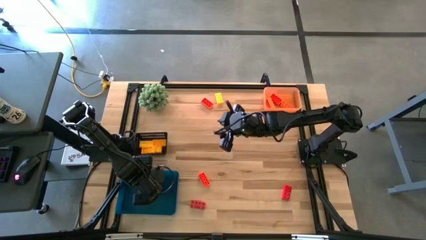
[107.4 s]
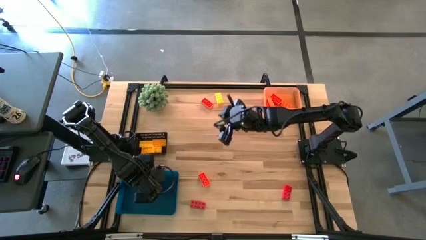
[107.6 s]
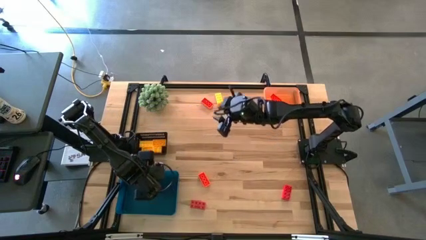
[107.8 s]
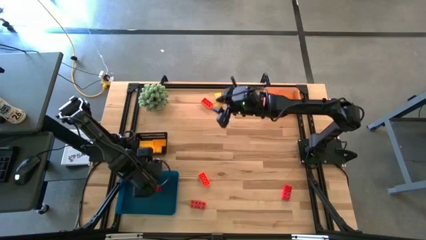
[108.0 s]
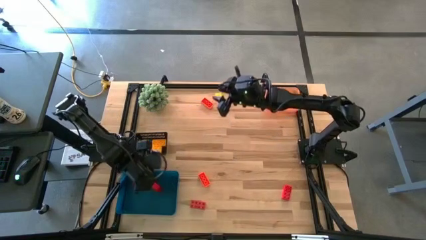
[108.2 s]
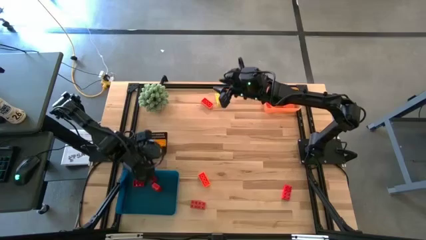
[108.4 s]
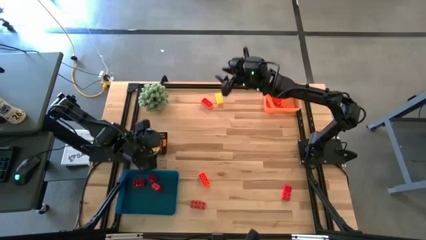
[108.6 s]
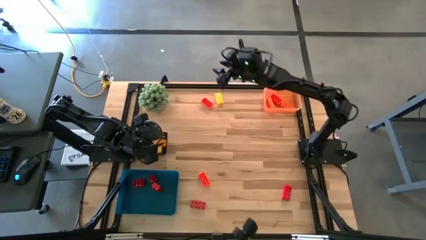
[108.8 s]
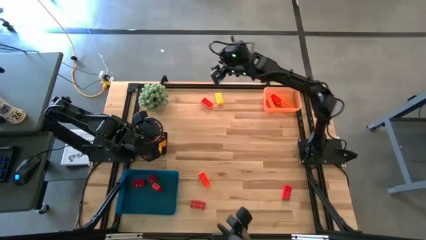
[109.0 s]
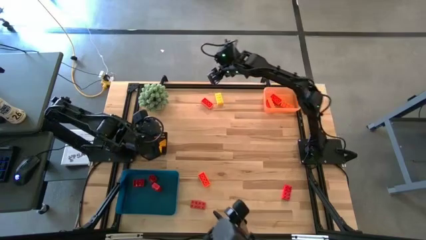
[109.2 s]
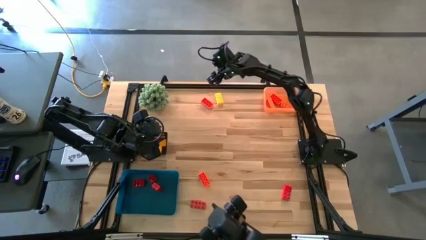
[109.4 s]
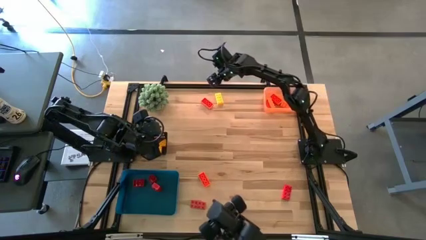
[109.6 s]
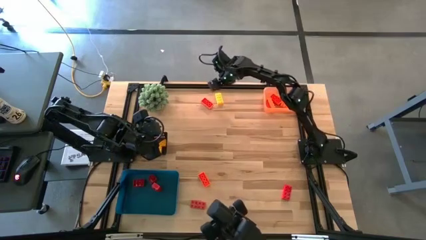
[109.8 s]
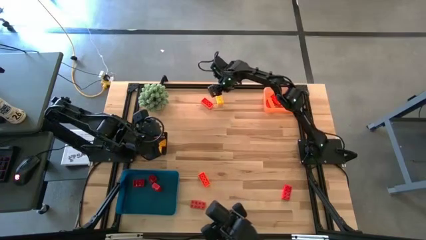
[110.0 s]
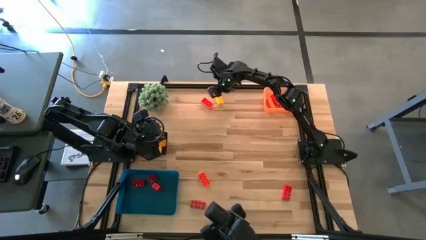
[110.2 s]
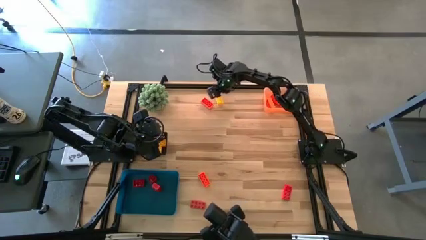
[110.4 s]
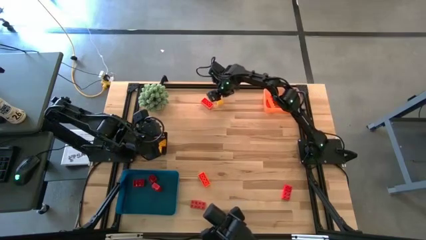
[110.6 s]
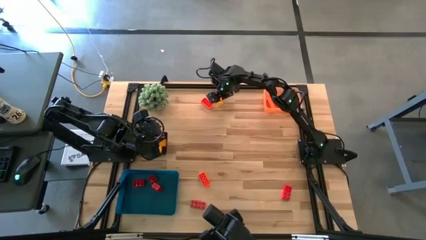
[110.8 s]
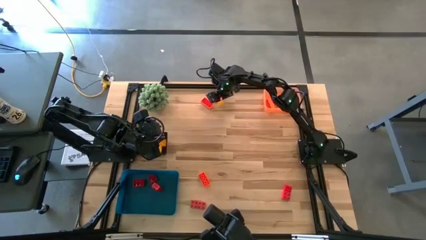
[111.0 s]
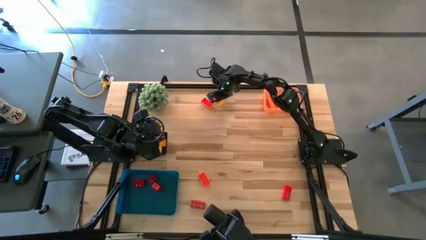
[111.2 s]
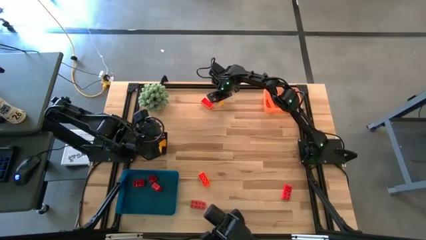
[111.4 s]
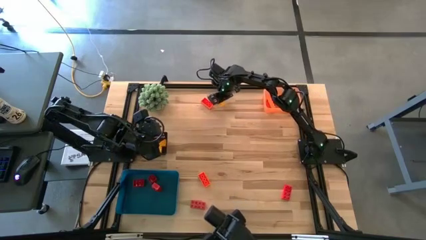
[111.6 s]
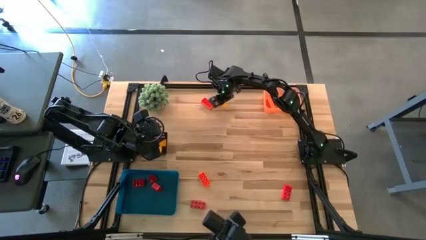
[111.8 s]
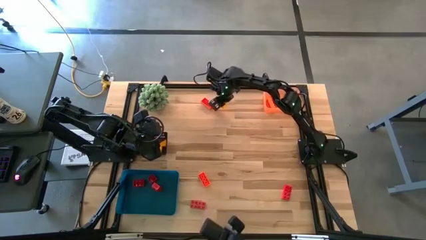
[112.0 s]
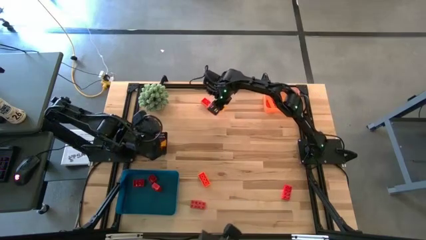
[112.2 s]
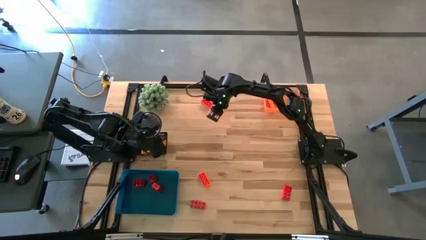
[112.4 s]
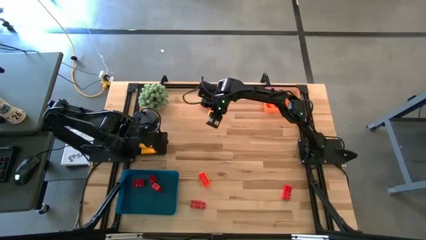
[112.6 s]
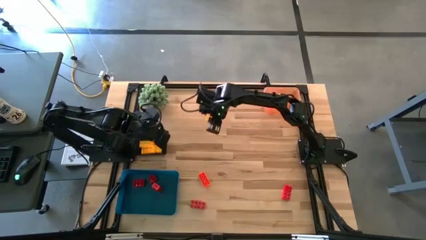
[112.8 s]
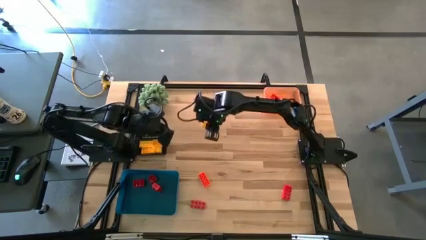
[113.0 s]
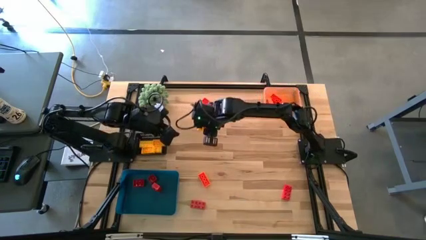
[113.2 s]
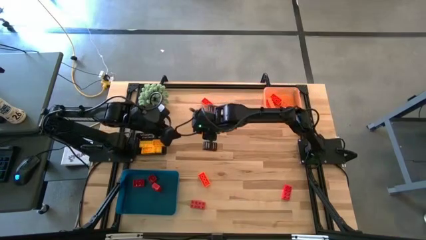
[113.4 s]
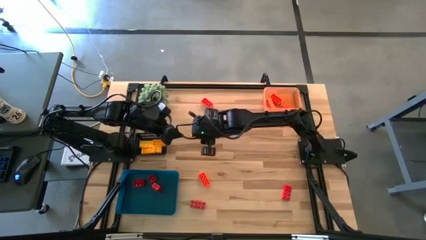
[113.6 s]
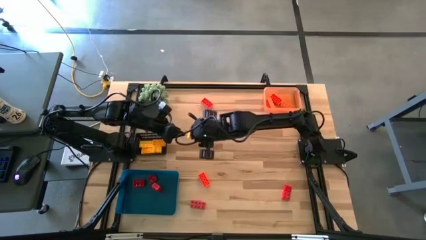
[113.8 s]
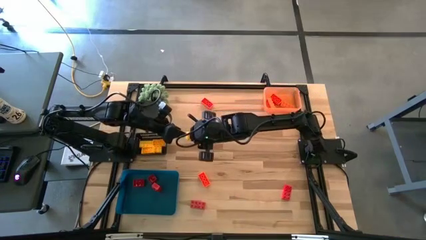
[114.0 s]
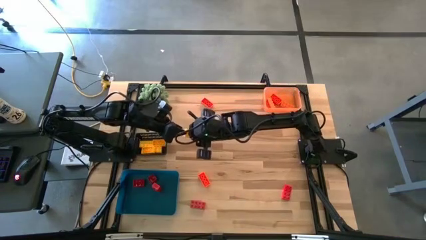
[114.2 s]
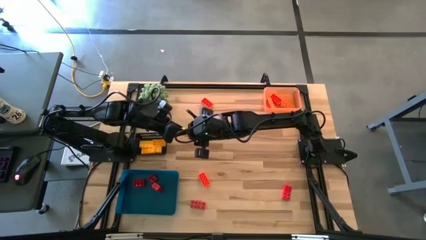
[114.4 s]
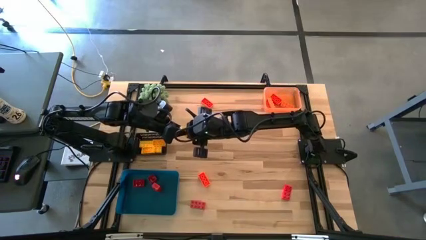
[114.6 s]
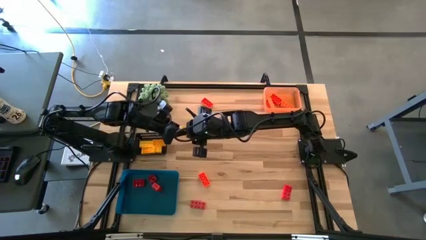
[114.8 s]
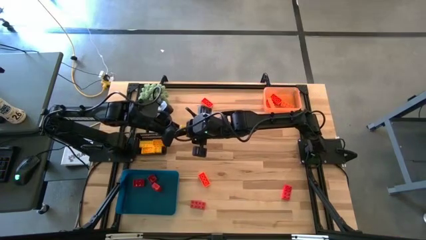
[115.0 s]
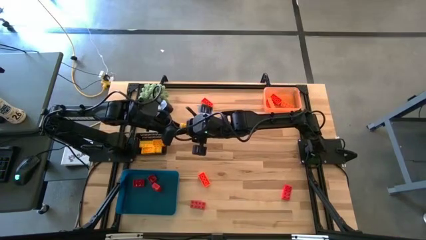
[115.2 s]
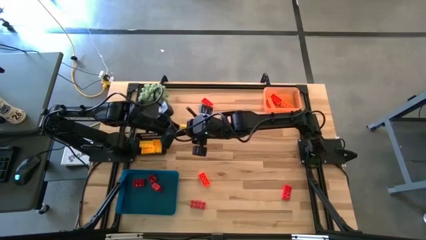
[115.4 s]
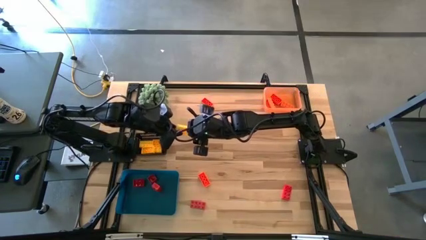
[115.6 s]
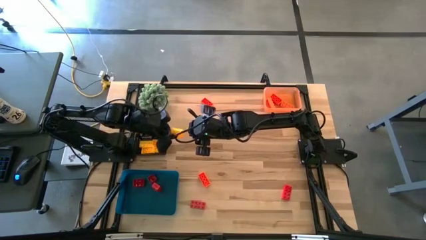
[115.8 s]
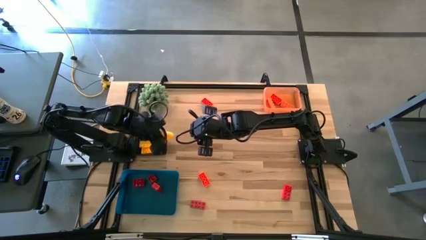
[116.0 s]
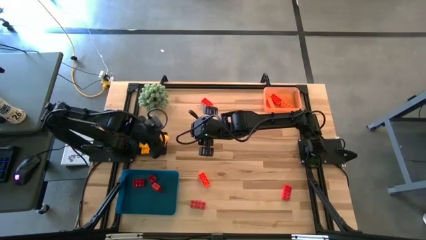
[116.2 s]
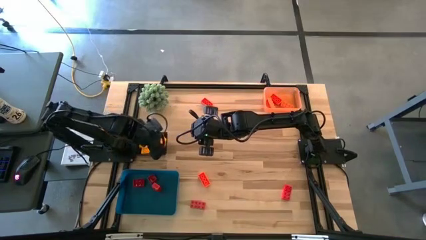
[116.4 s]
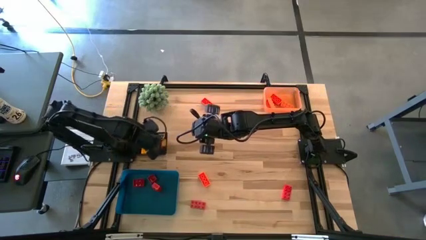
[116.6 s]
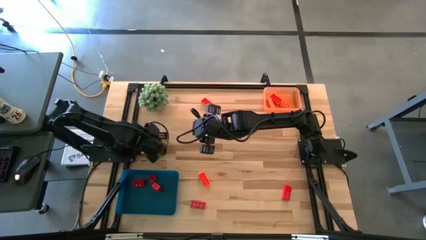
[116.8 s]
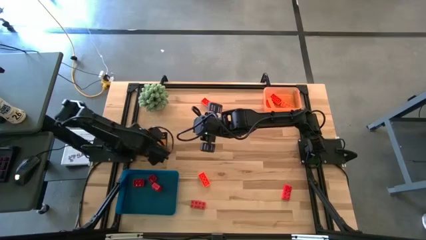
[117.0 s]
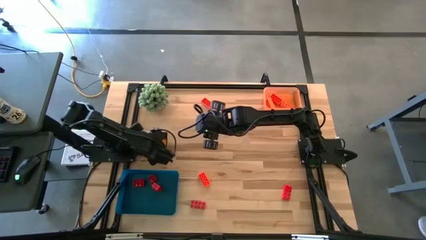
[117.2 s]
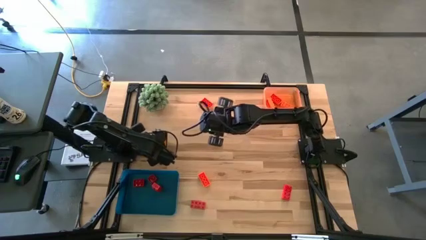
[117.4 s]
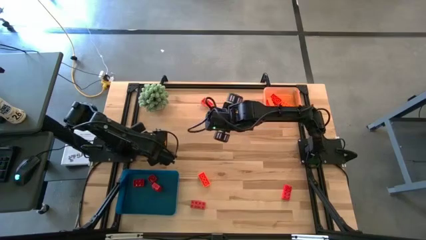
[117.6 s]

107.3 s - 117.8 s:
Task: Sort & place blocks by color
Put the yellow game piece into the black bin

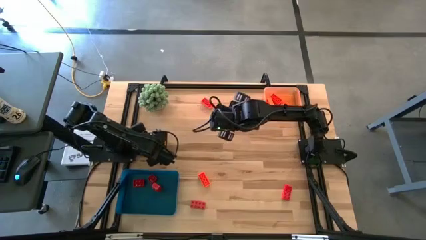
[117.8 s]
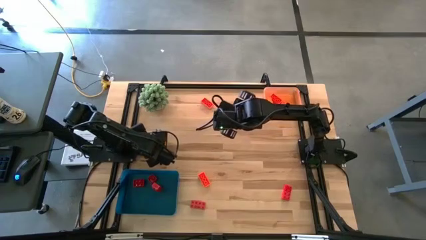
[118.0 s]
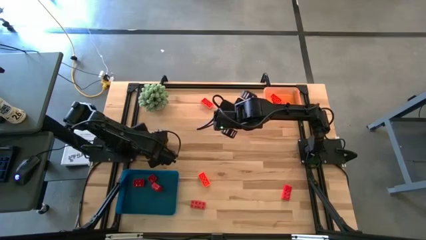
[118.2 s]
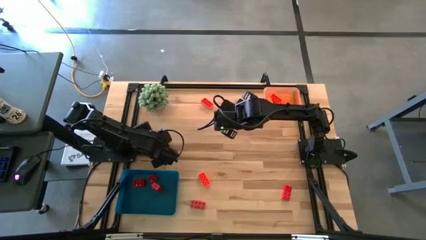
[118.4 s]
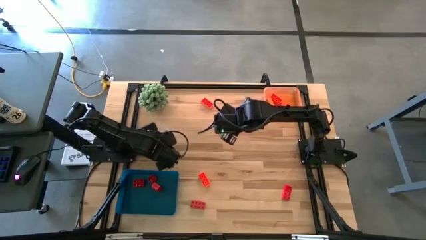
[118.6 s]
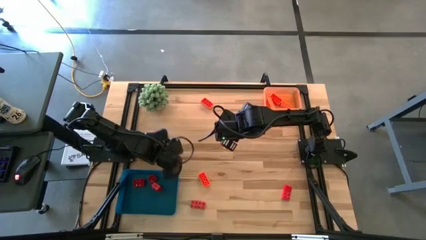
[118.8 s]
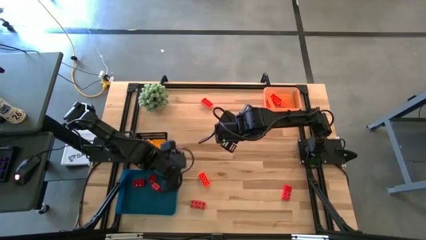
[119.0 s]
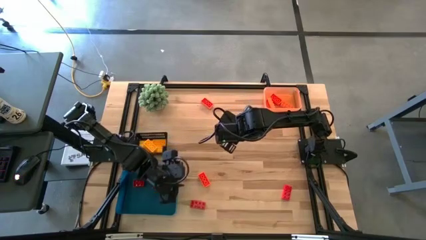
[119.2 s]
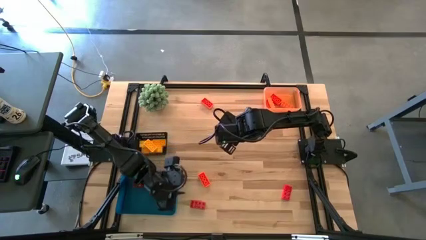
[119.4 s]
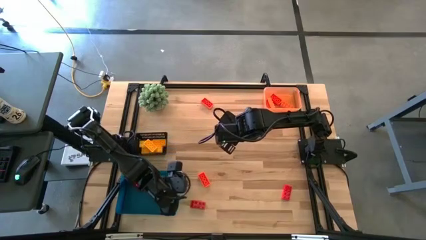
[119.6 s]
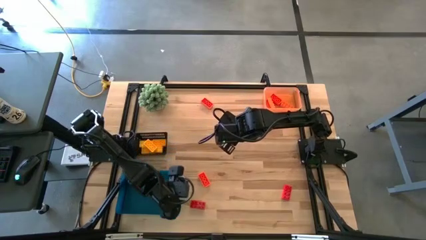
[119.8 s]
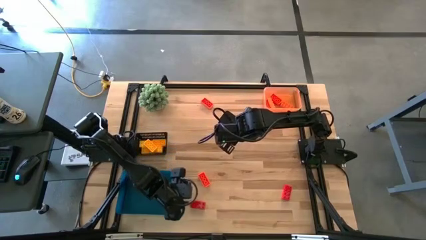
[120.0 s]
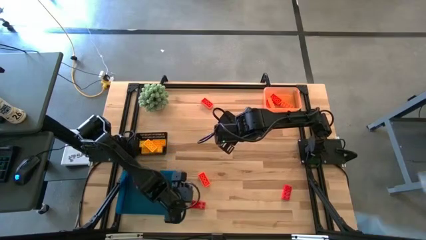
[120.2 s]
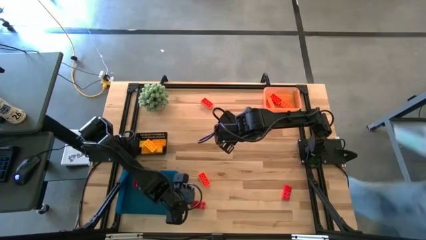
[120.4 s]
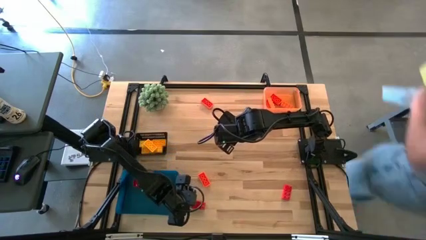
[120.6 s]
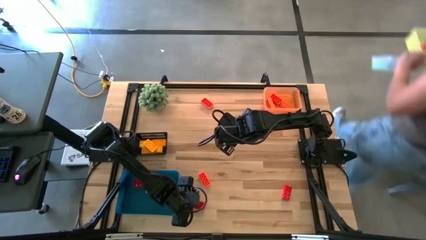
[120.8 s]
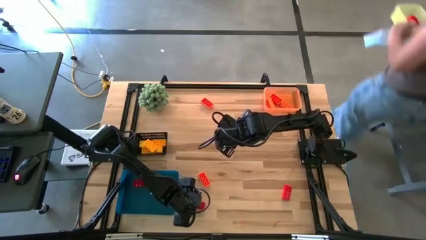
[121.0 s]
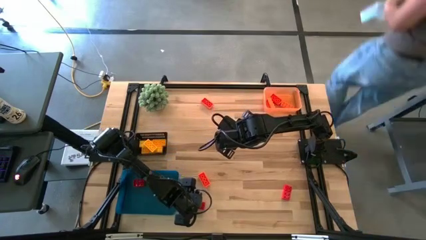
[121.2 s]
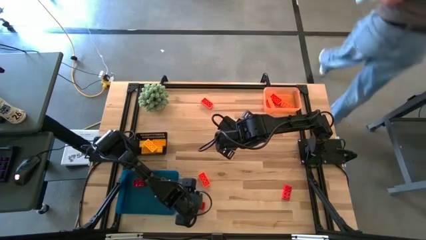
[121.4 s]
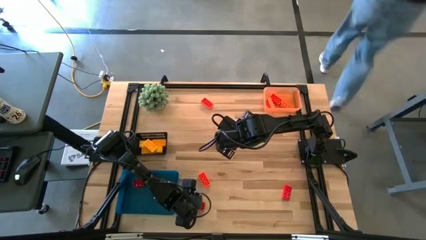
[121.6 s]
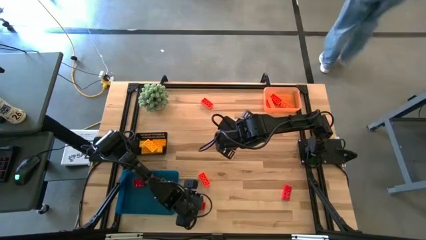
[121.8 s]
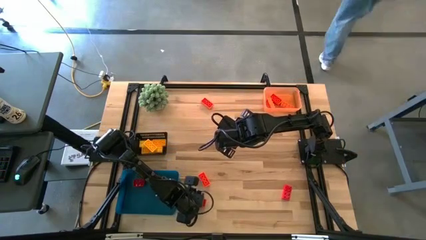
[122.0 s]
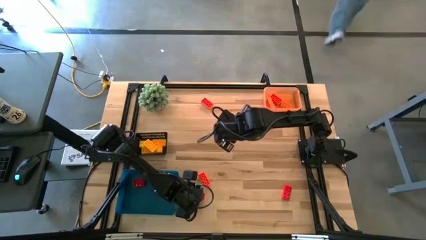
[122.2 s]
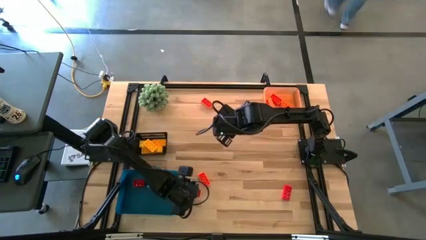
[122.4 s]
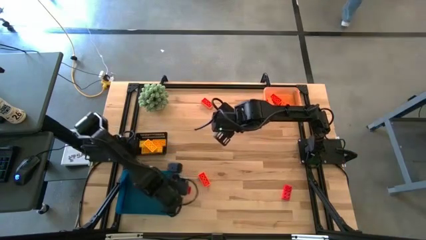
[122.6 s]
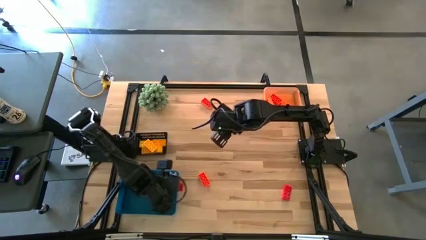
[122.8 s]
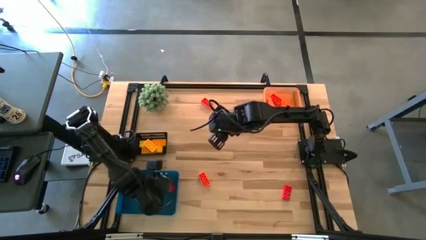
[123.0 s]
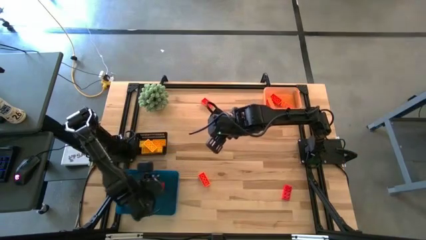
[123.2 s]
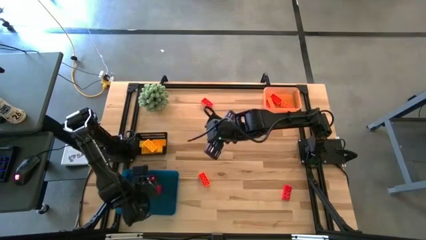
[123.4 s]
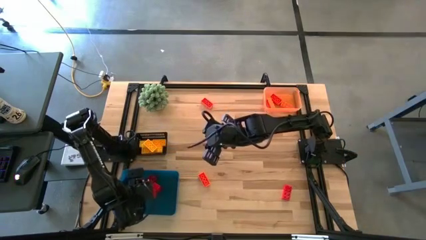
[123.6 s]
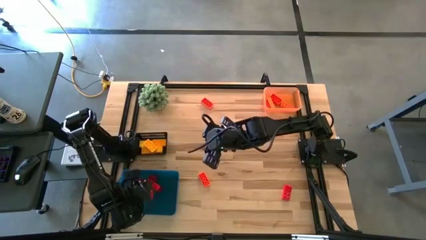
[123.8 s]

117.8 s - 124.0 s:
Put the red game piece into the blue bin
